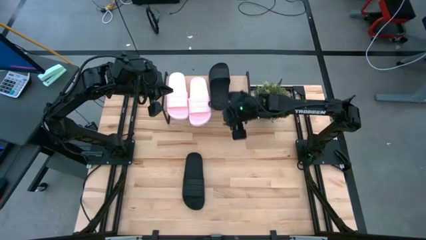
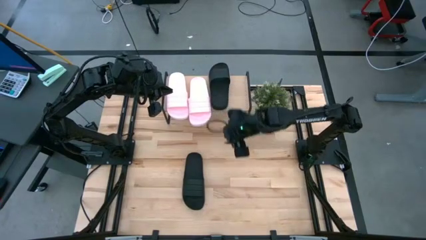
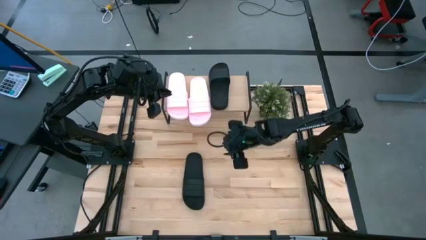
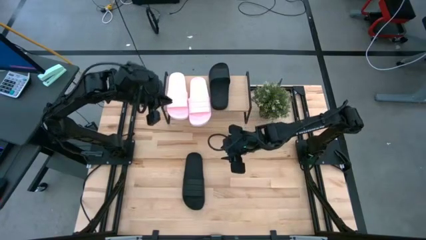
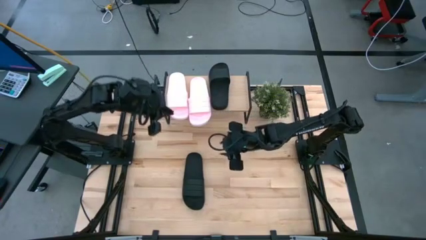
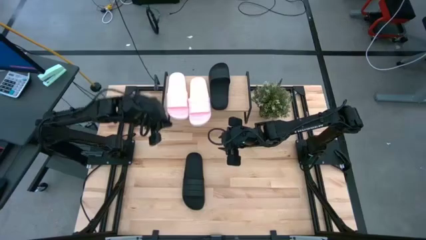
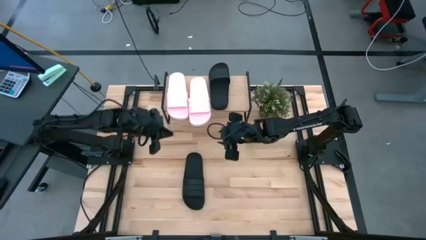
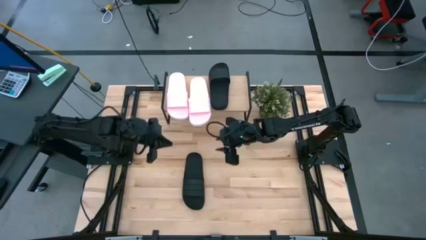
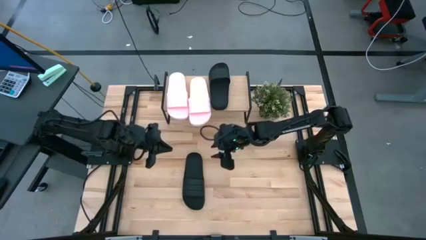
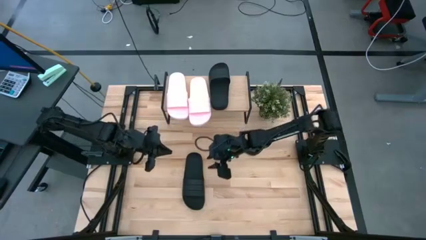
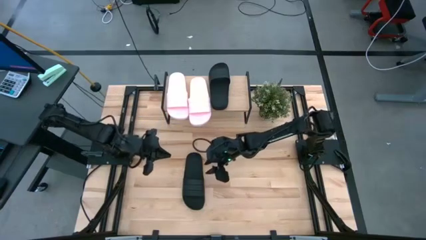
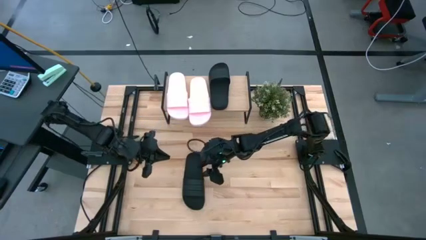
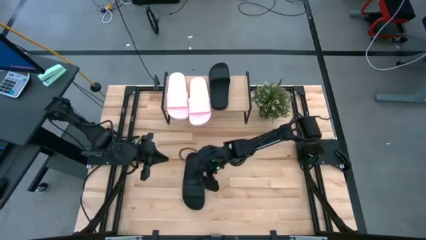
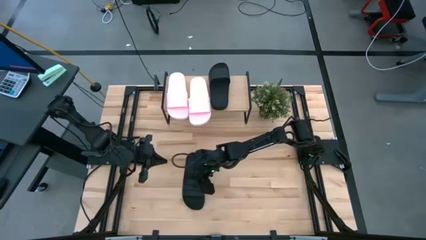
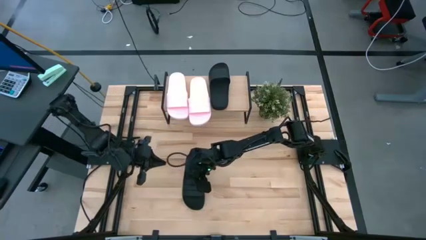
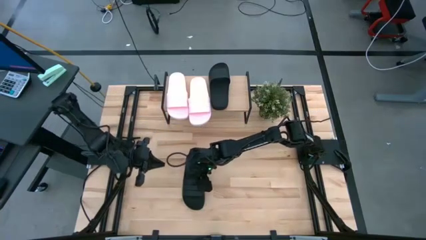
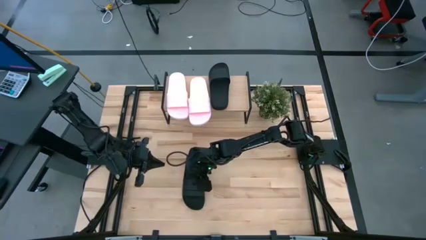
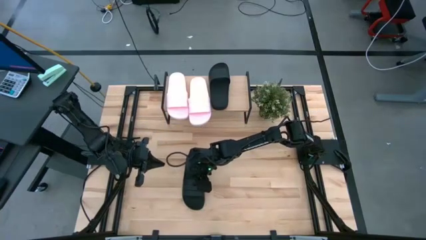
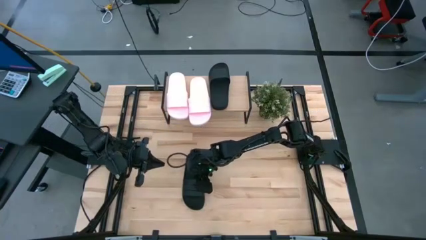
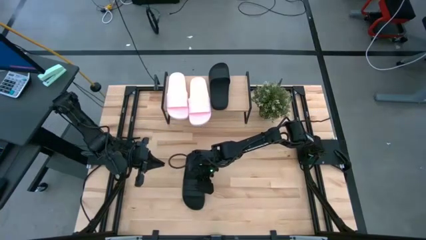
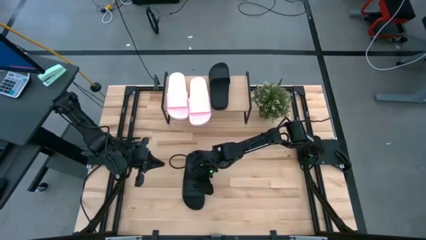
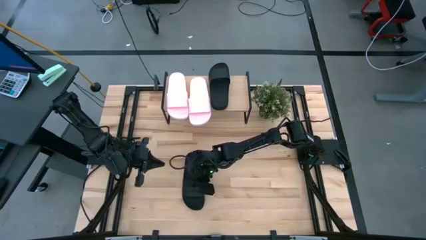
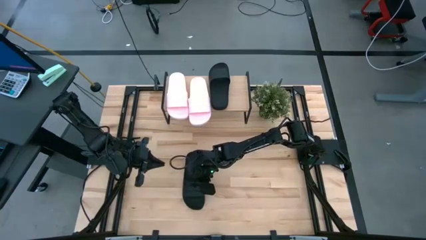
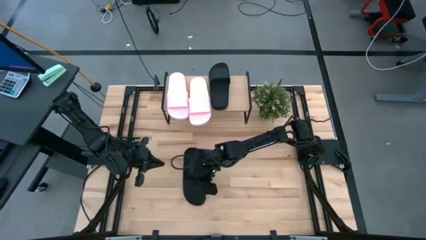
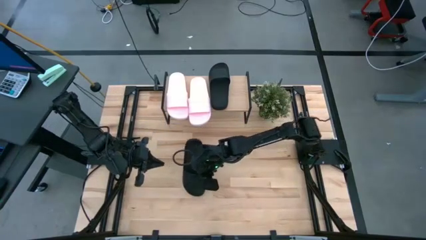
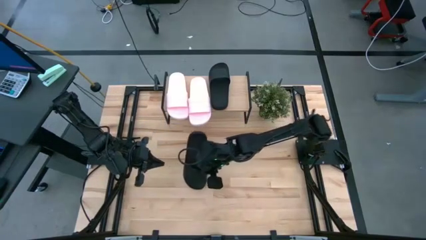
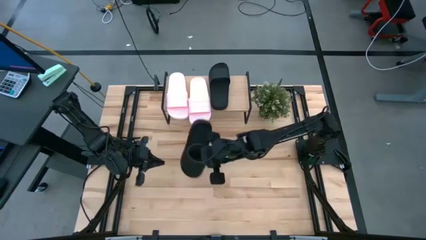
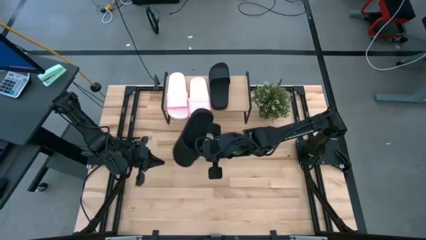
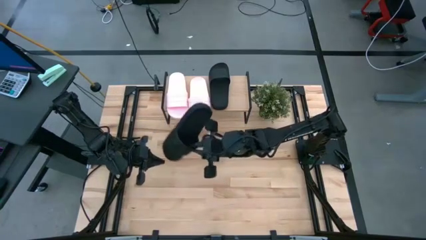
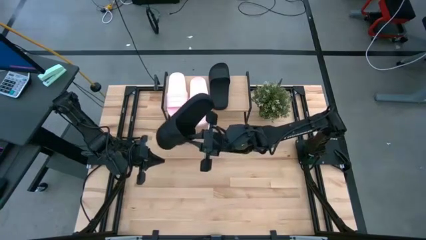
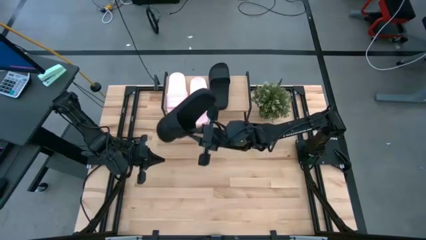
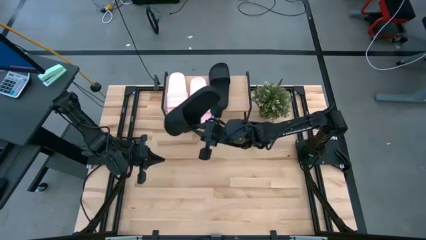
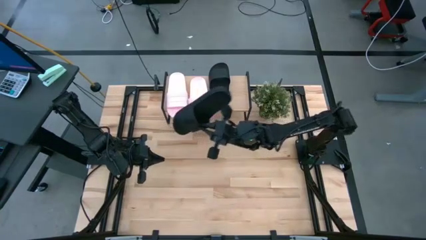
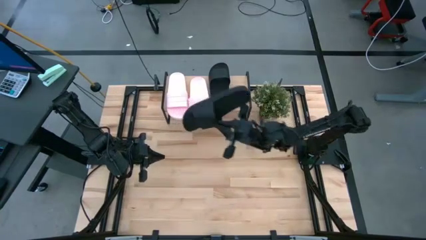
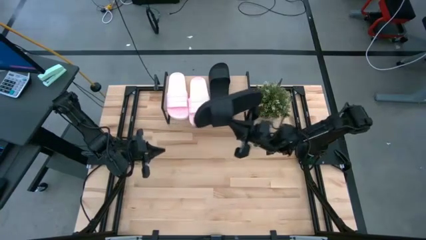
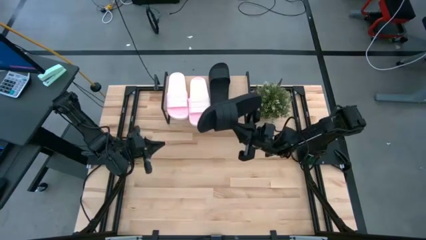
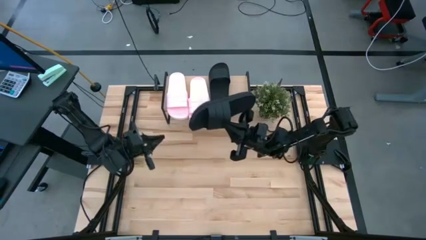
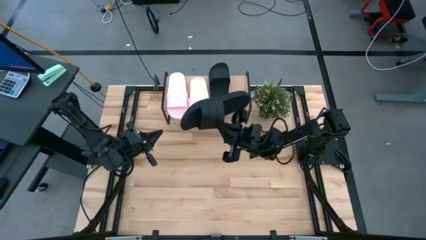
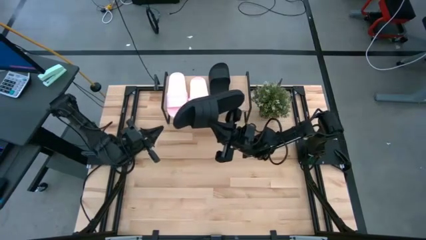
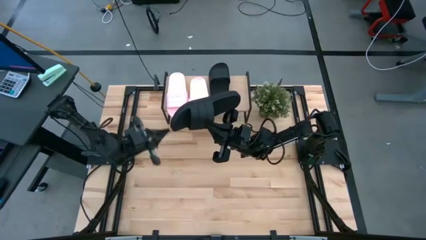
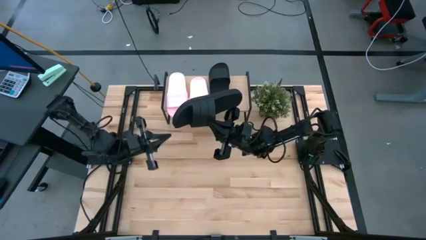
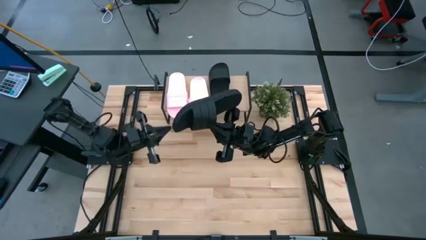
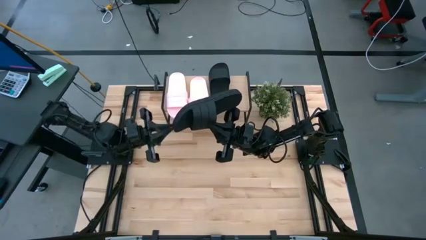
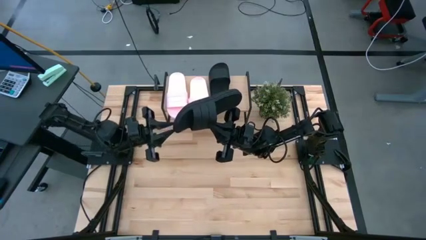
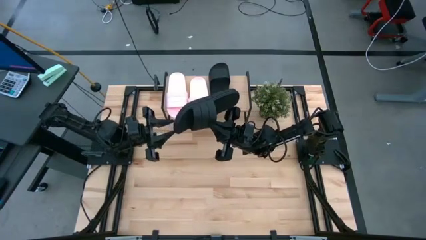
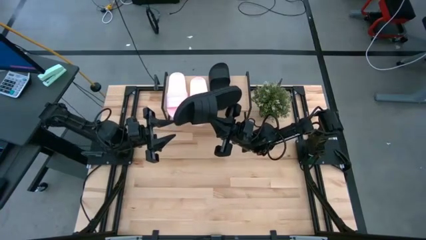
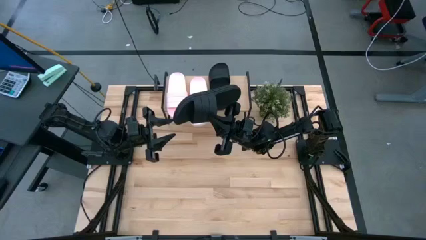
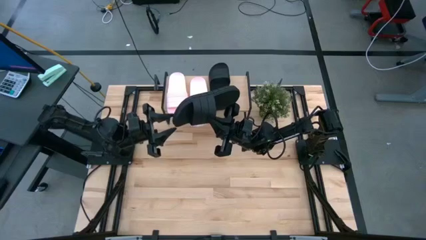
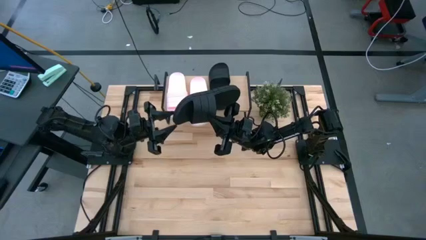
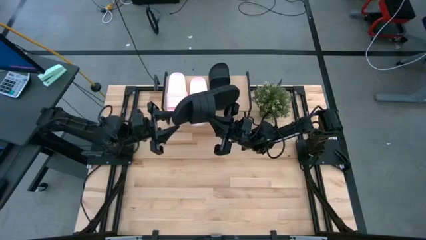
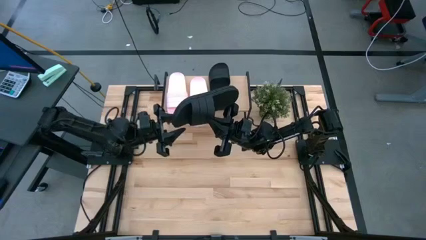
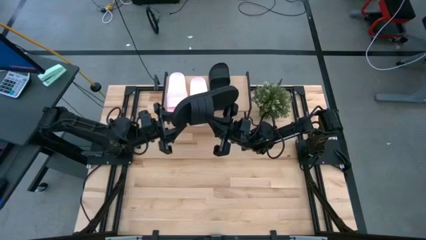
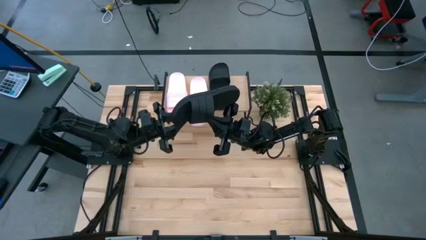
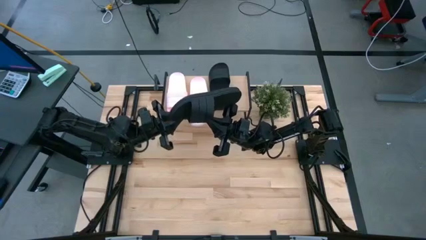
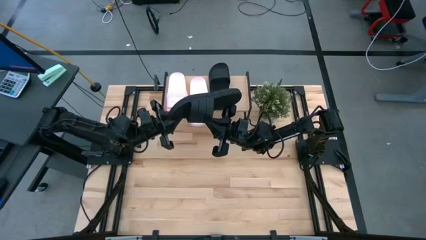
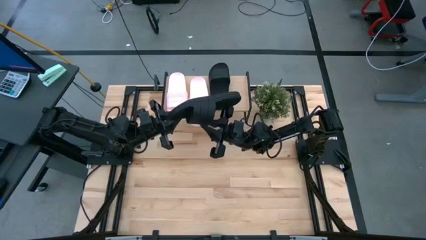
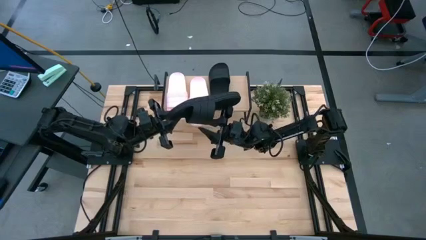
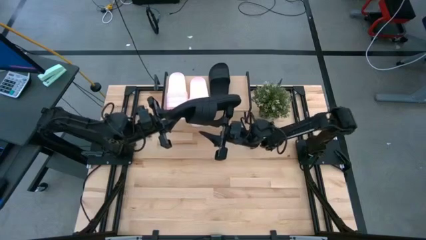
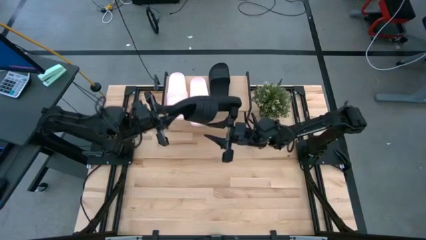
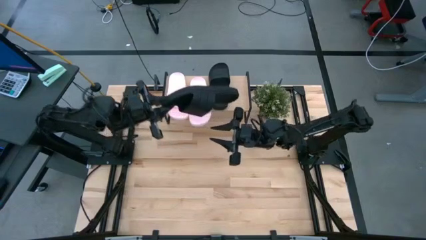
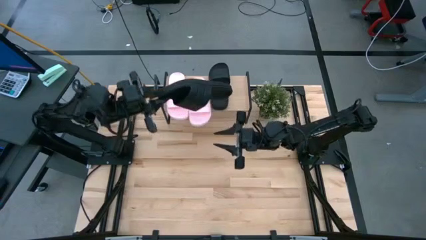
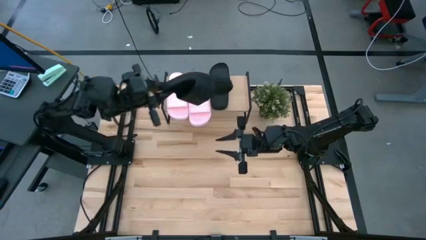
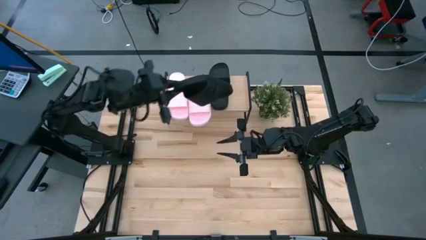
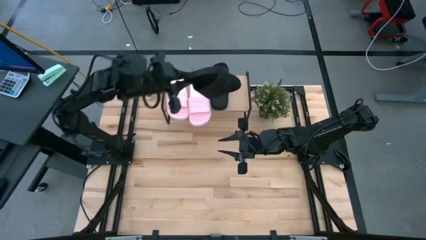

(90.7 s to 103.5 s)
Task: Pick and place slides into the shelf
Put the black slide on the shelf

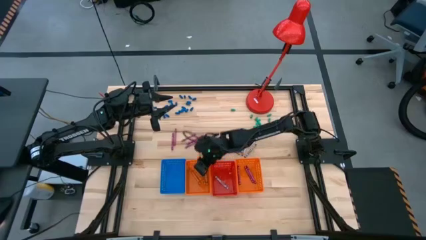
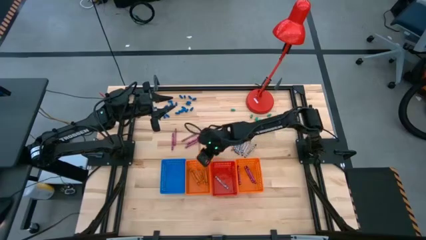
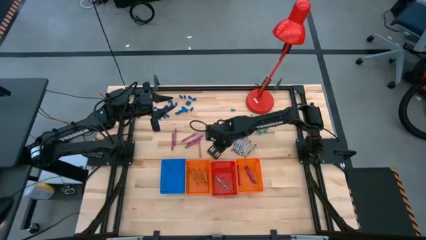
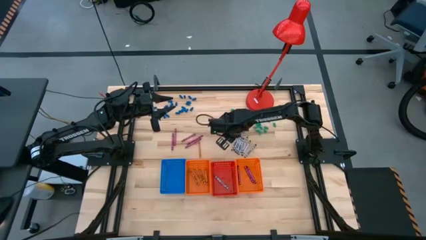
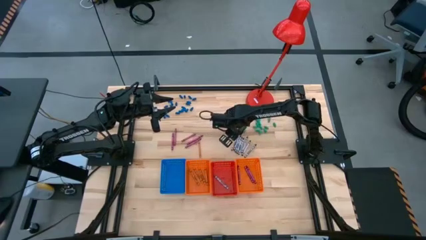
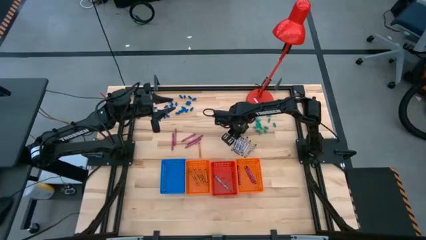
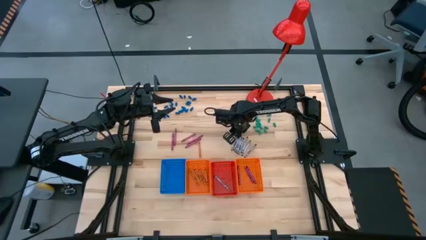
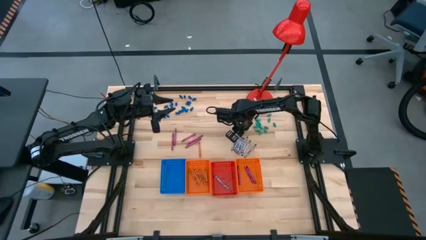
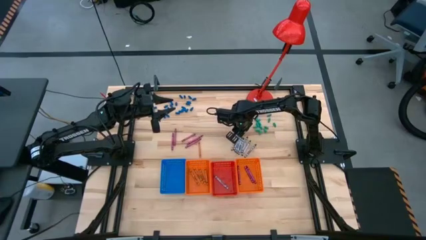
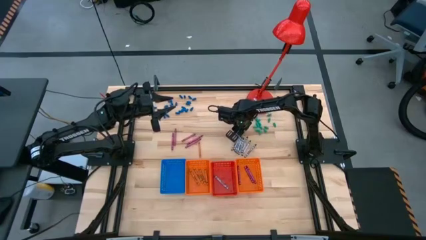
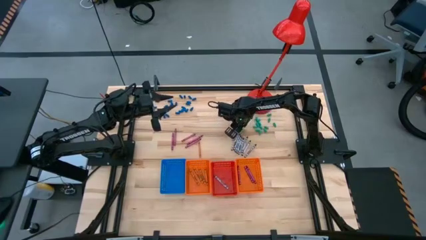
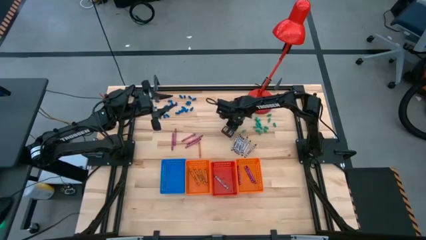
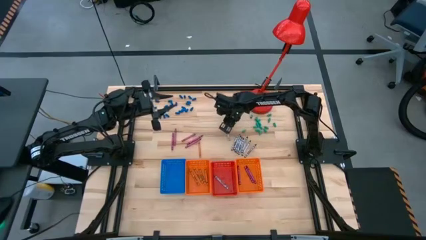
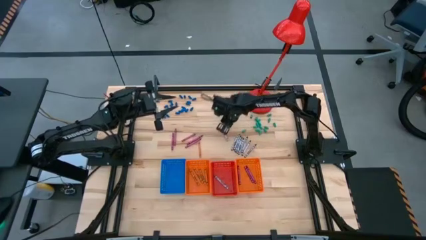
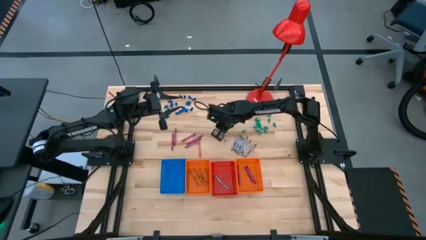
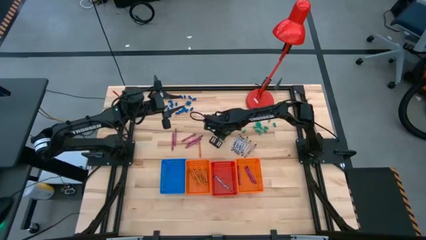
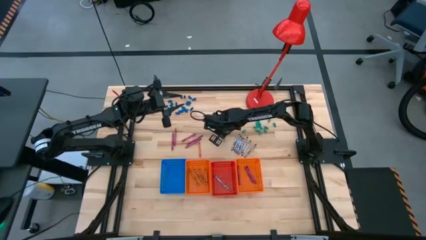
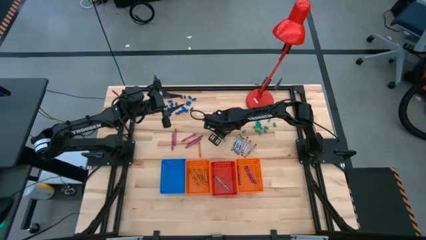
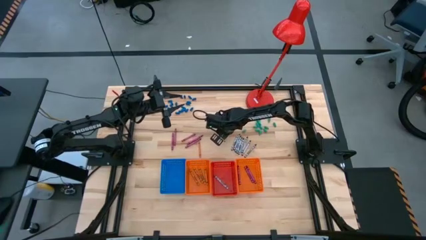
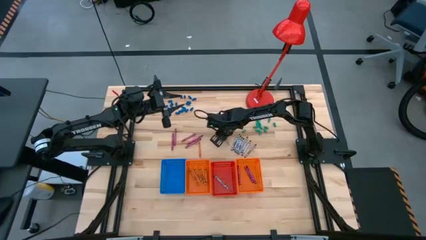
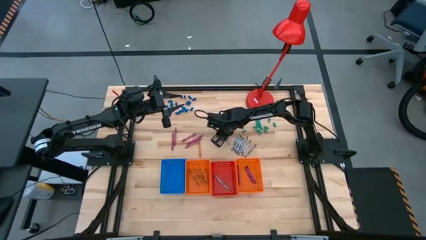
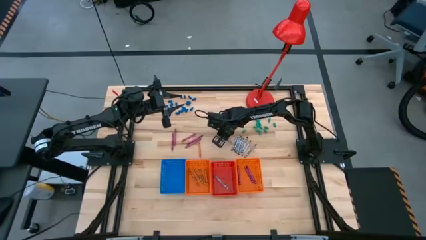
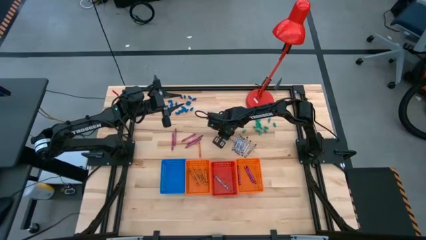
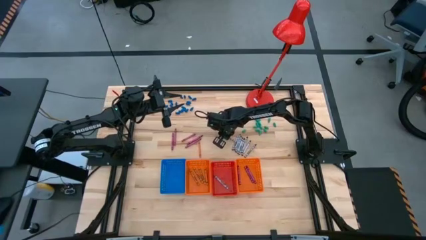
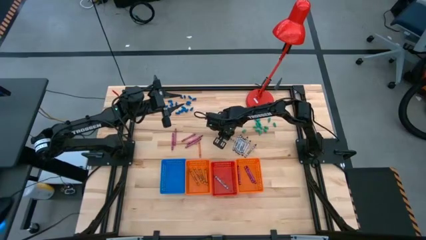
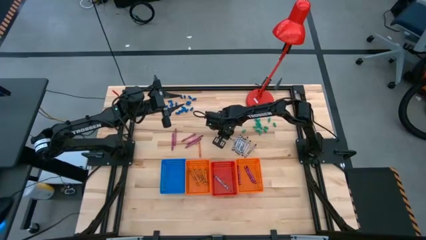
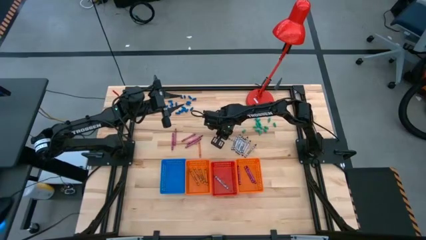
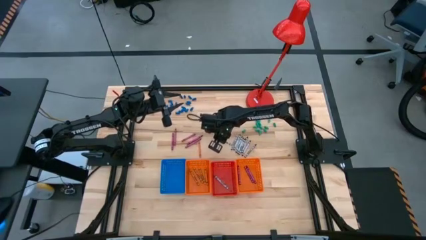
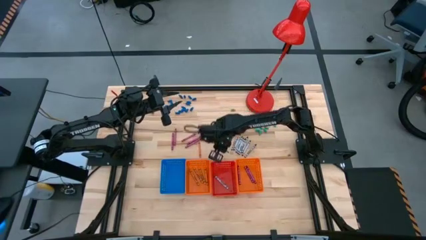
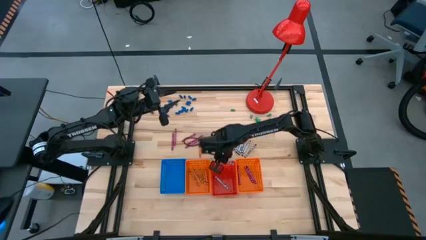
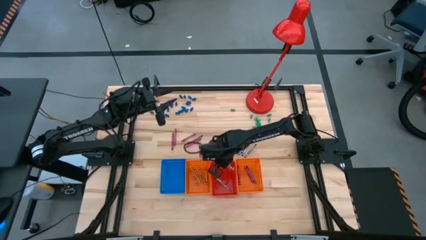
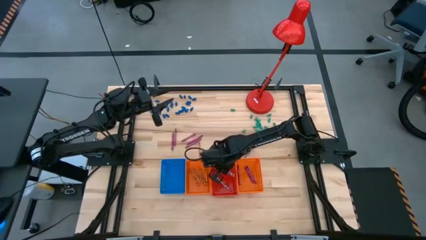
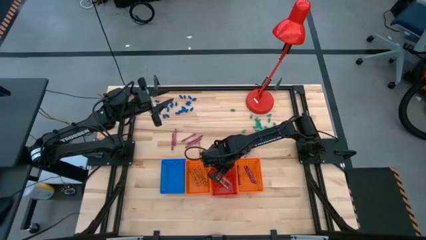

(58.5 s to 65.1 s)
Task: Sort crayons
Put the gray crayon into the red bin
